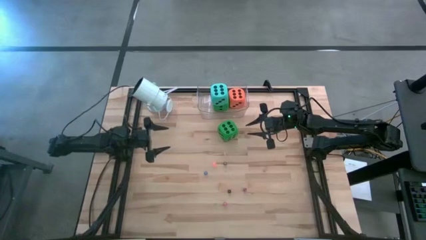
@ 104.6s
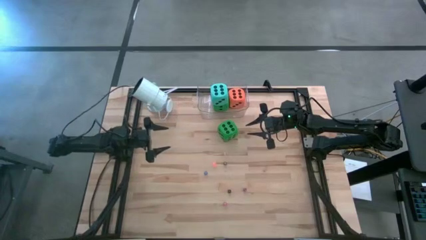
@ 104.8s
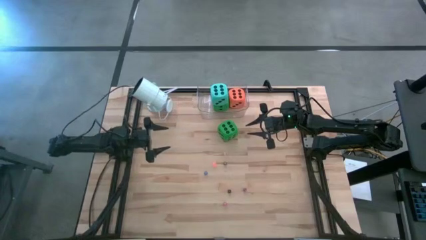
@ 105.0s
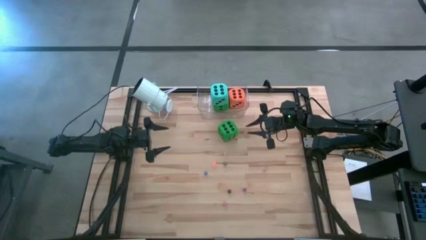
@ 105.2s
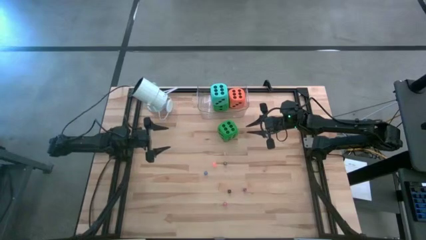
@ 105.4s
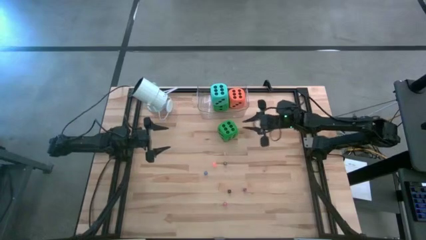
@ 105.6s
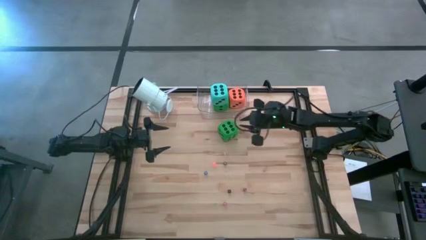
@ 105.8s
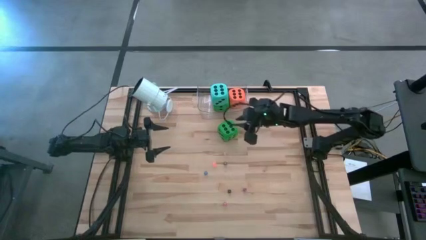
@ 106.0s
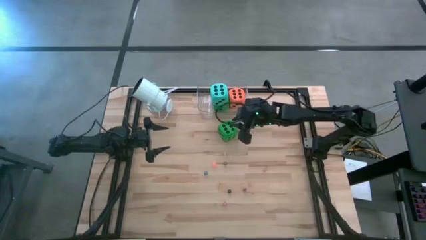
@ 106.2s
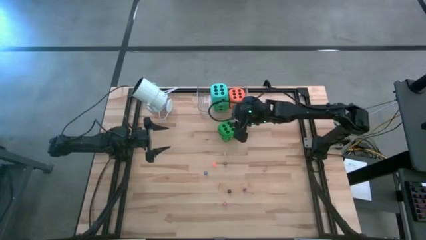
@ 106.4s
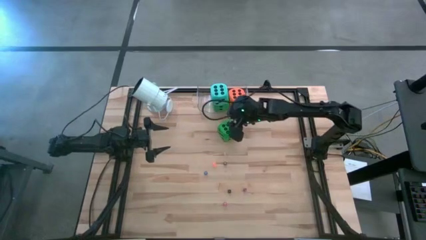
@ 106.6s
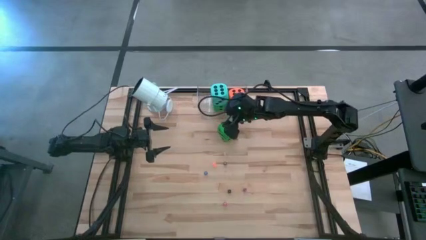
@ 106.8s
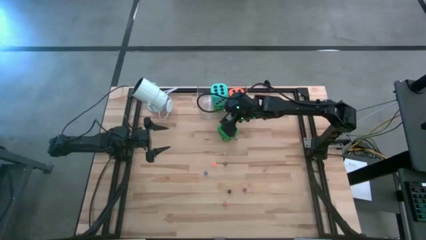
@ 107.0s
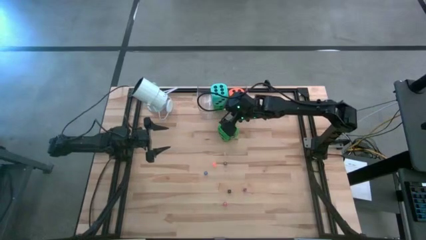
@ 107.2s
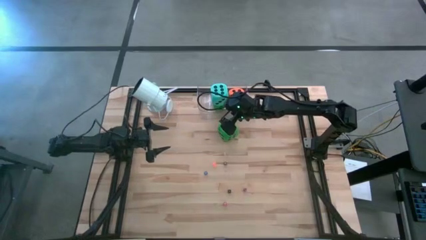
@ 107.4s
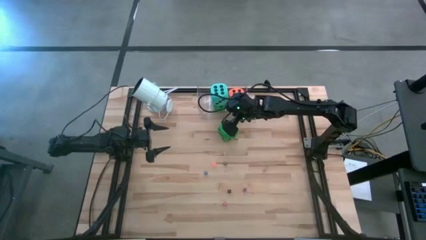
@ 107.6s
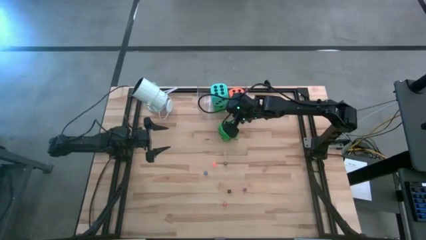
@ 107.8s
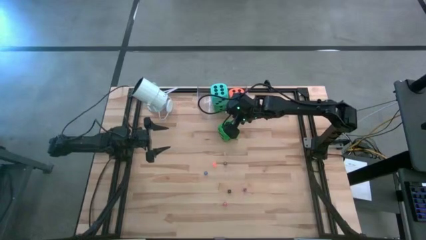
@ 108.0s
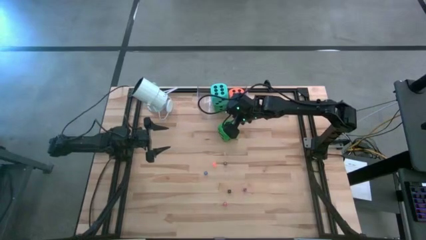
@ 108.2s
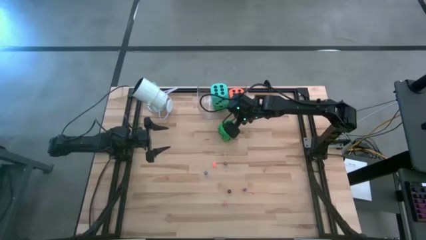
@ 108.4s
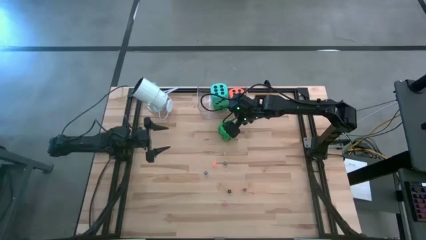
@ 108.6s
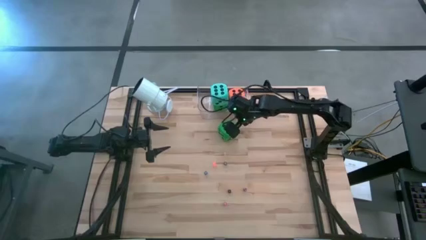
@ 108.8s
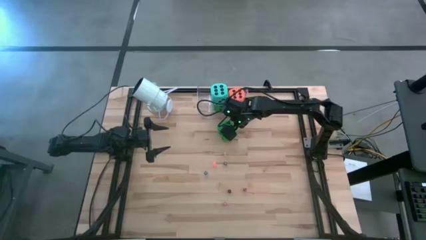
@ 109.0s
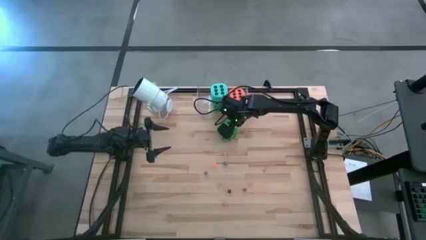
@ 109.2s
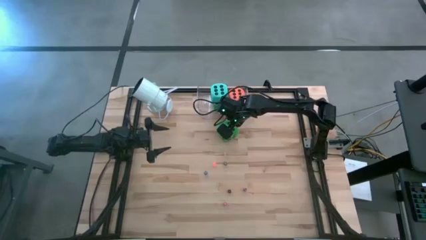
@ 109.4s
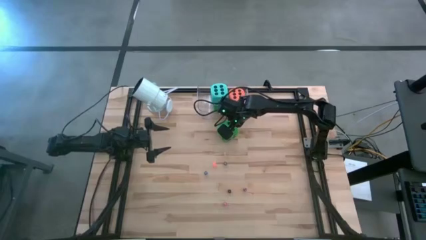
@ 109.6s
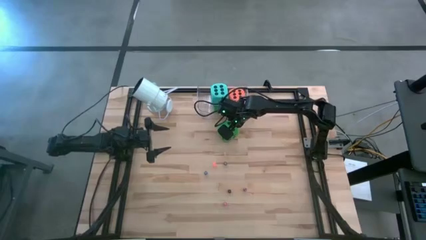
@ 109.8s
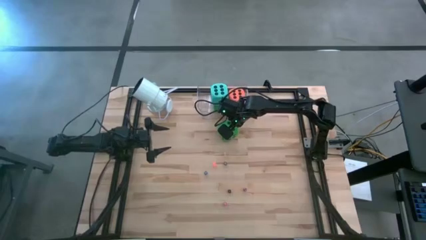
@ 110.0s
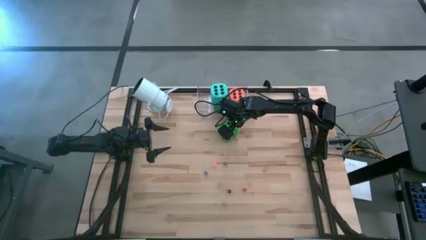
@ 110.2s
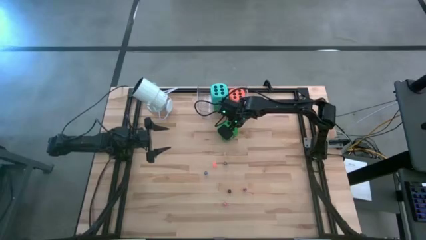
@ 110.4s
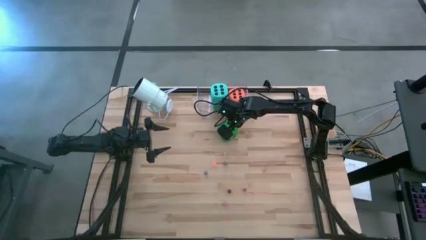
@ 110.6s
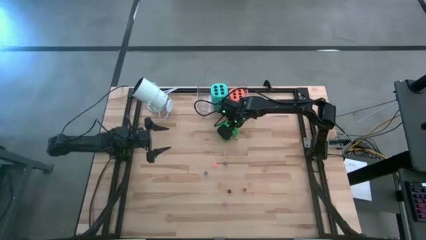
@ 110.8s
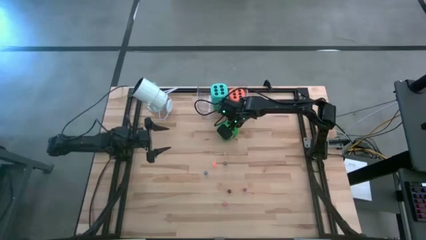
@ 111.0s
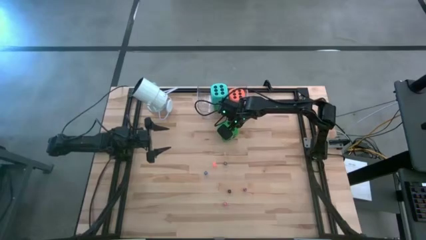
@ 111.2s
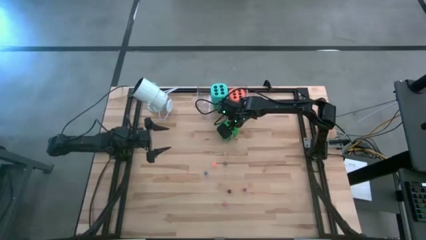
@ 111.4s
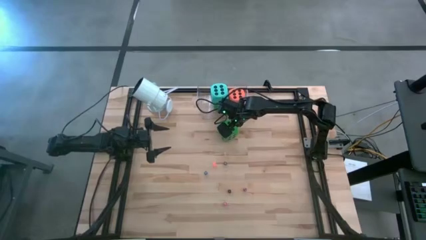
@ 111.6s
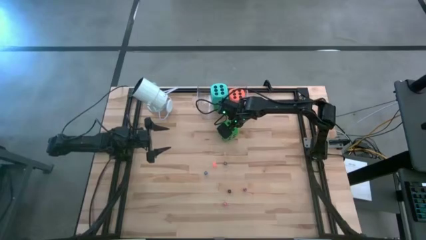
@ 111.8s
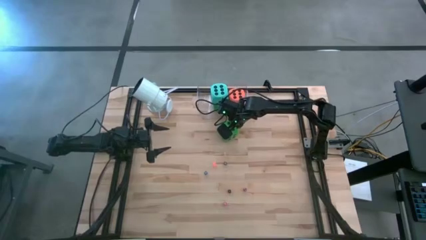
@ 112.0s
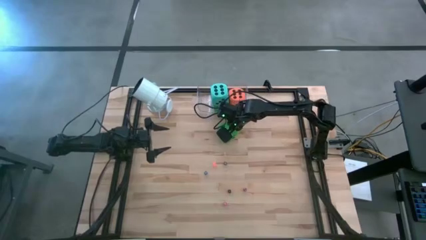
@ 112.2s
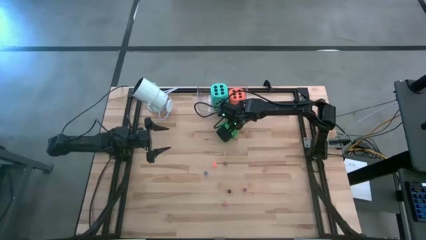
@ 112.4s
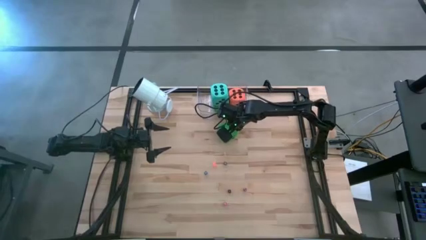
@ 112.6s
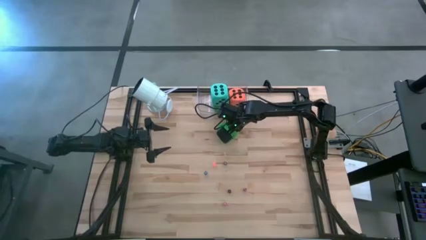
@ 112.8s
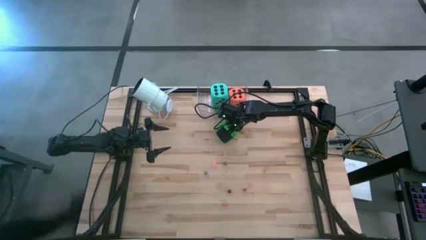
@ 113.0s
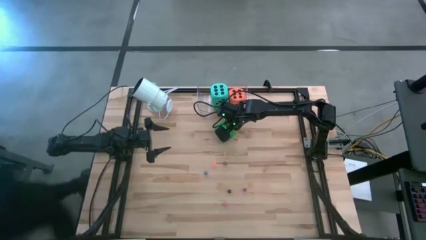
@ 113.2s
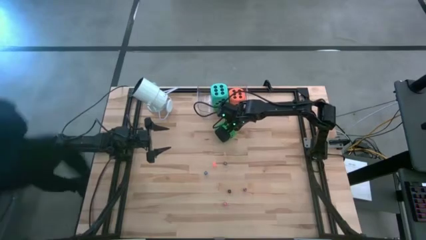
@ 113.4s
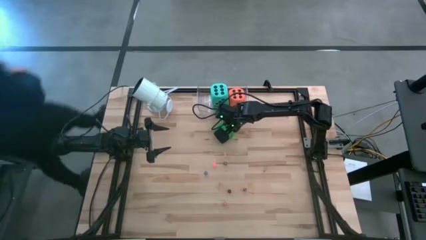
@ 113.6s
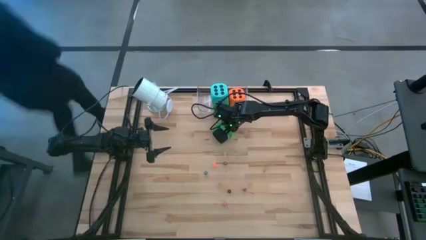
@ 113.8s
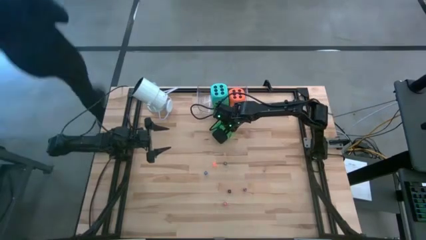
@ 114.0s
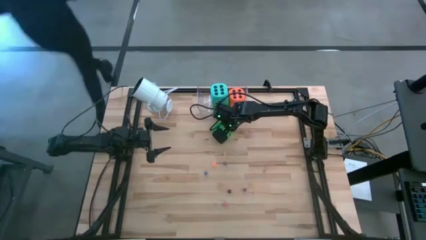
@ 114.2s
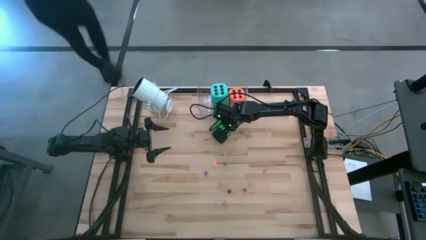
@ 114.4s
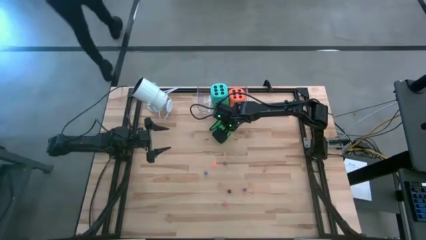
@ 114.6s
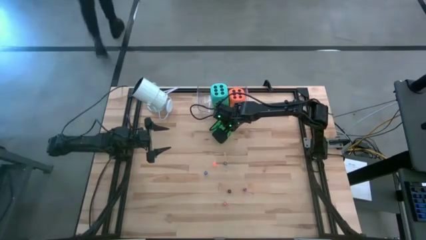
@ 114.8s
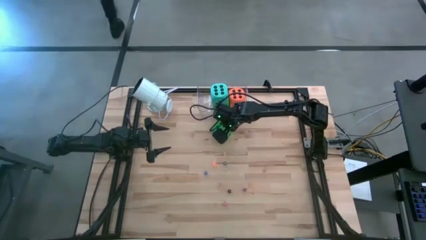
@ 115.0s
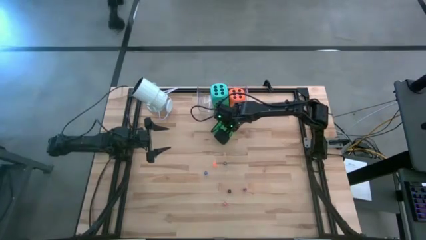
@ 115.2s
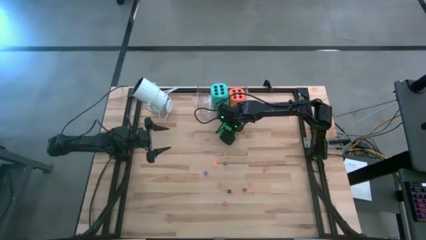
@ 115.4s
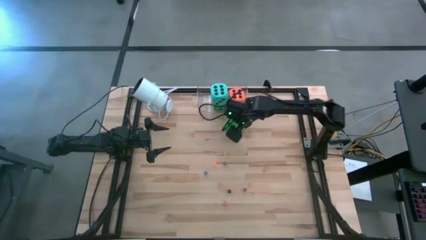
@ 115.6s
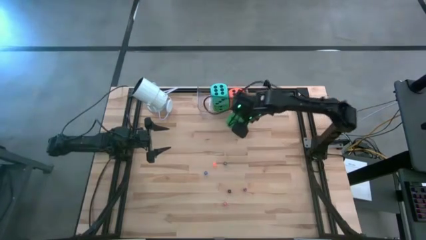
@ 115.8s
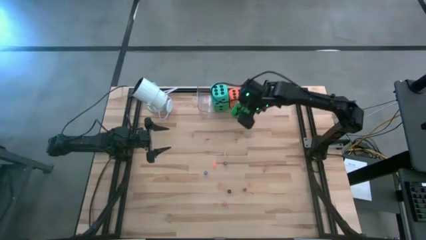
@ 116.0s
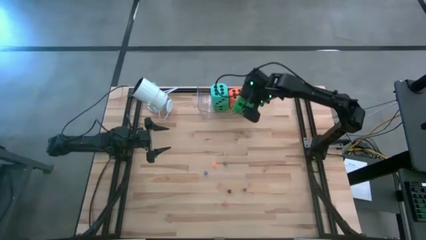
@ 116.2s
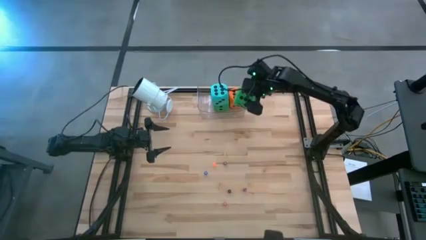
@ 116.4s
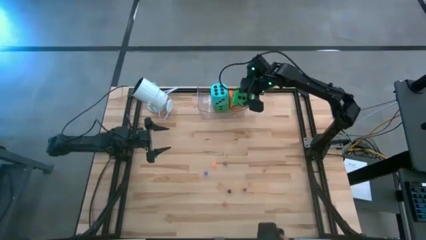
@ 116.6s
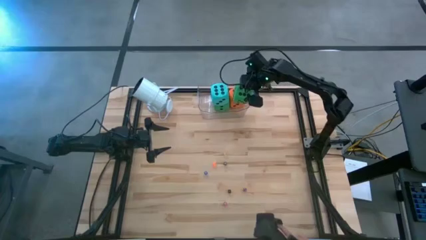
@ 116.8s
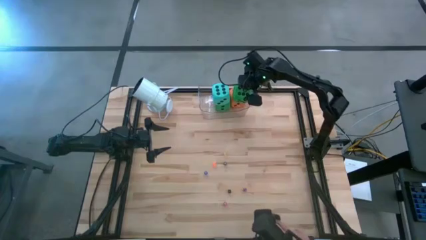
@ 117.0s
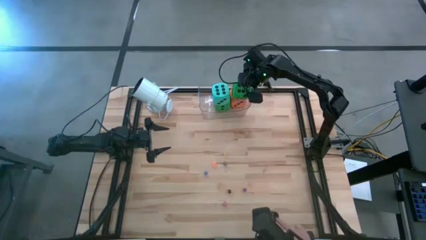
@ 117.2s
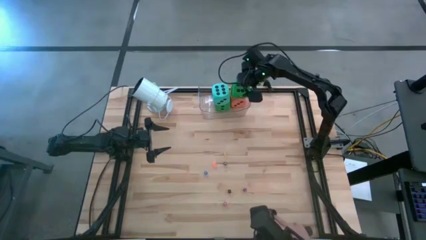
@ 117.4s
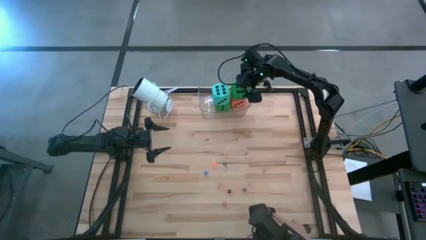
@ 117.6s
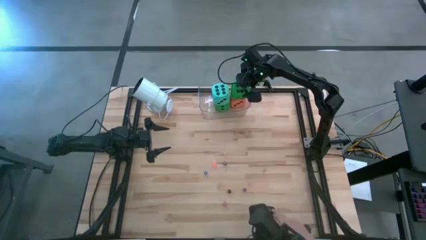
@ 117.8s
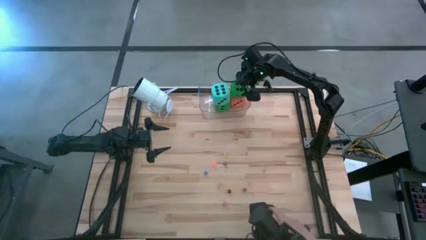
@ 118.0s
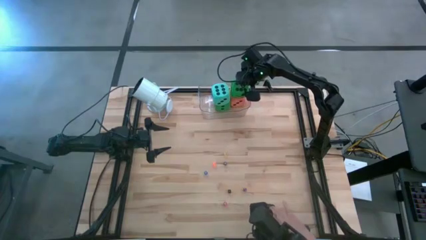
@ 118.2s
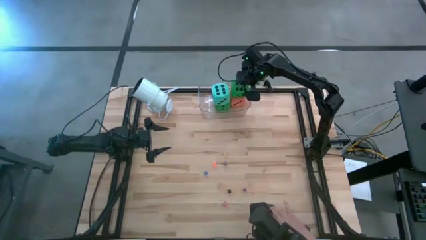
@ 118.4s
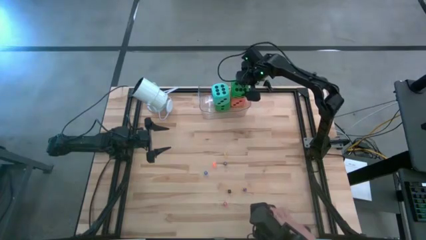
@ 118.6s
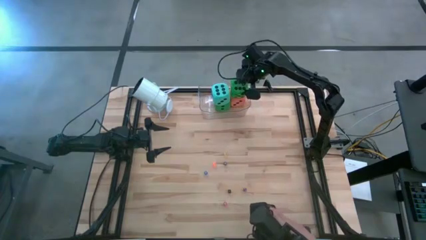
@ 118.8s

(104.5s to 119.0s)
Task: Pick & Place Dice
Put the big green dice into the transparent bin

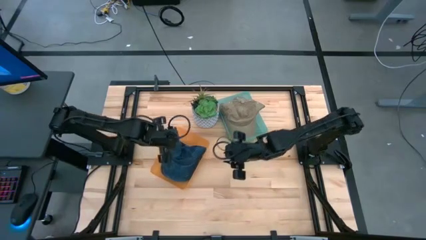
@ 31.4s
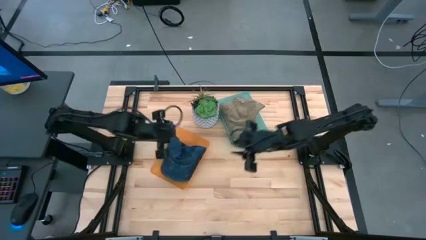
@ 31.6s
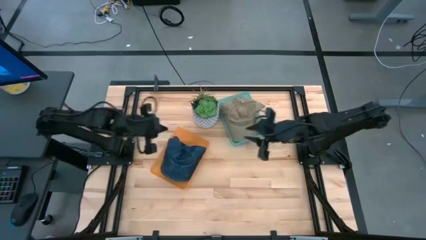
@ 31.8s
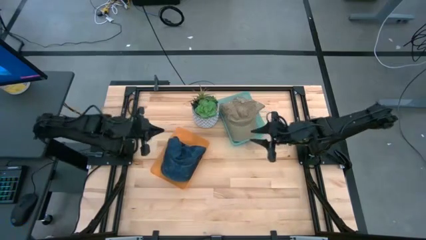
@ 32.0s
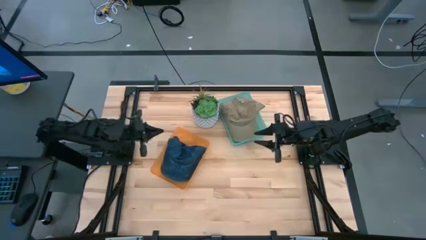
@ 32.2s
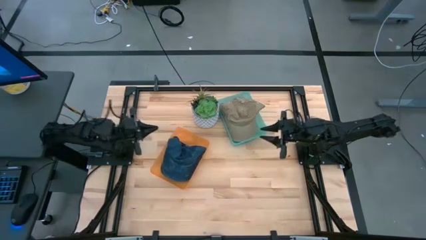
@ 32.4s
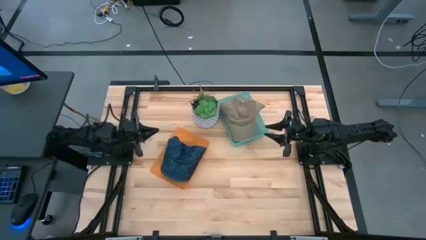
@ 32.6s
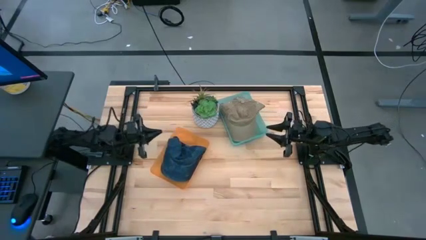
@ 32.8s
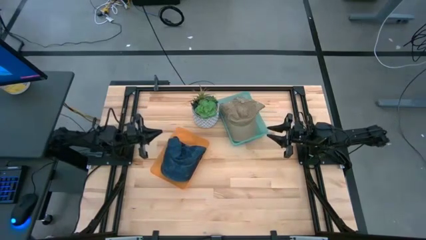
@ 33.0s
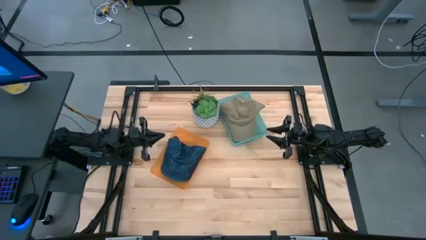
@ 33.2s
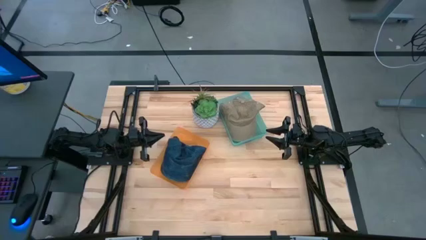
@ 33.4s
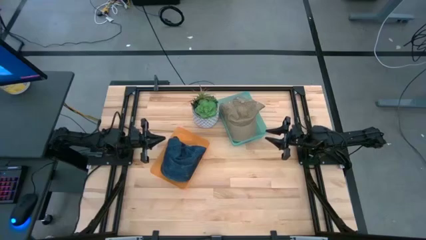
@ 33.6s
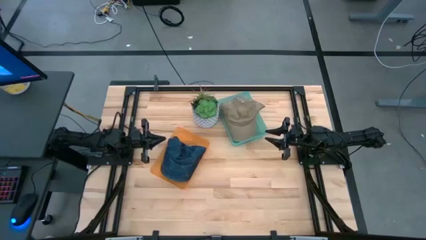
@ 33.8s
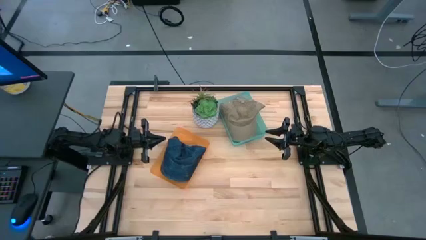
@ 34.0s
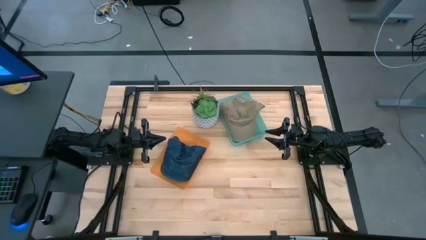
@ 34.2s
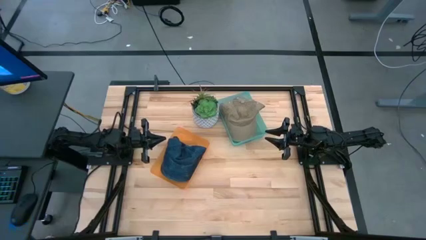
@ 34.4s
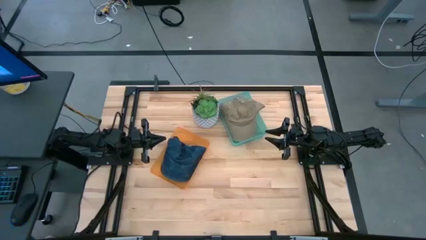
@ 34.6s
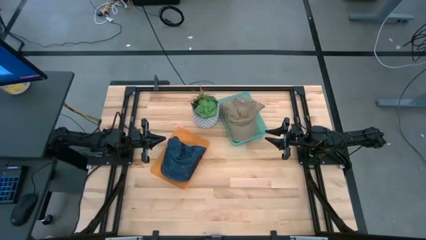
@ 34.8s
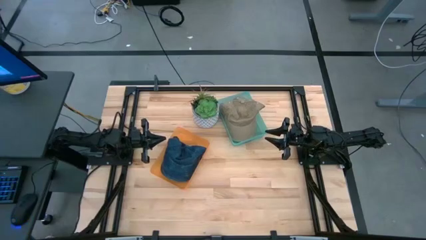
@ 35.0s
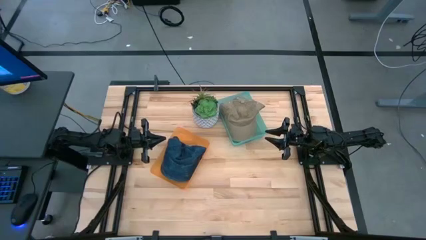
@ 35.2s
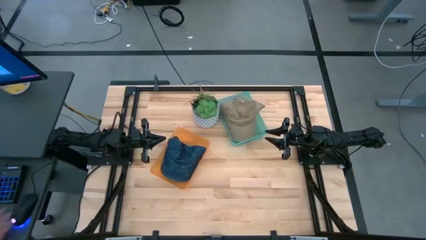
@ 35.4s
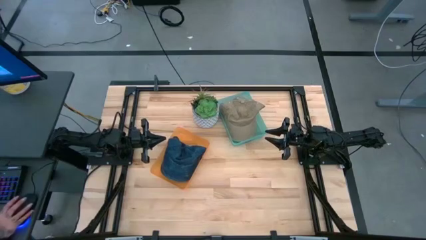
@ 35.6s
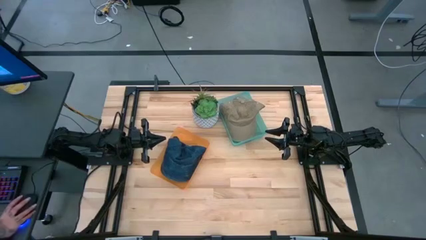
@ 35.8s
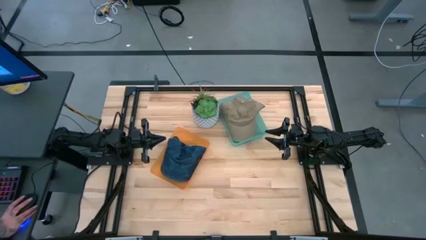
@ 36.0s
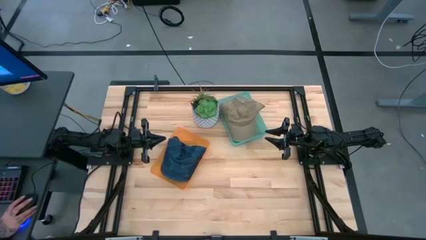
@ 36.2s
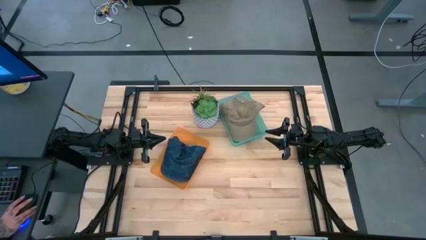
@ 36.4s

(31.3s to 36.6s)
Task: Pick & Place hat
Return to Home Position
